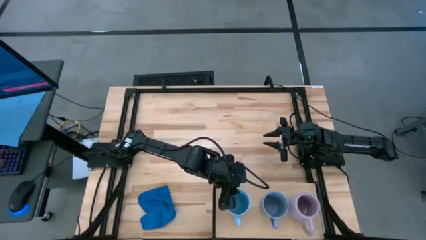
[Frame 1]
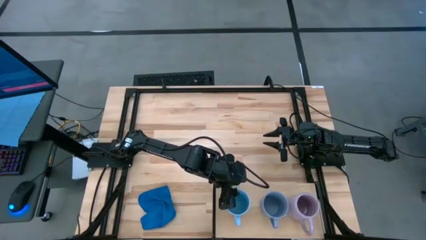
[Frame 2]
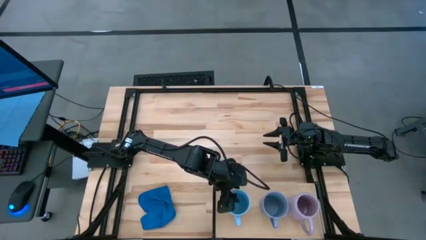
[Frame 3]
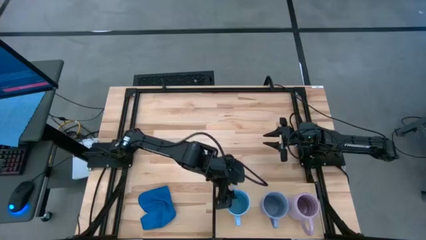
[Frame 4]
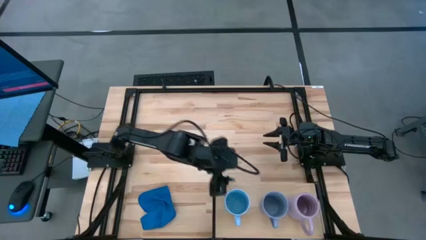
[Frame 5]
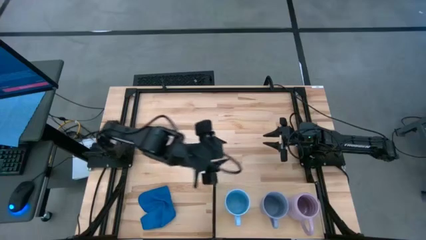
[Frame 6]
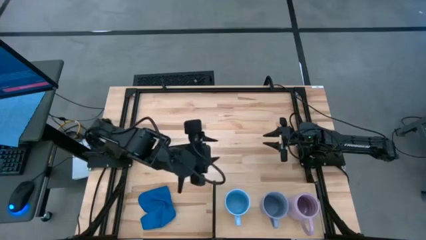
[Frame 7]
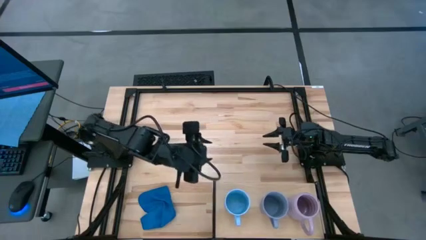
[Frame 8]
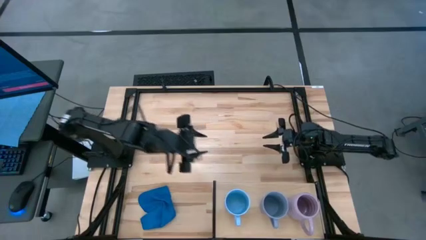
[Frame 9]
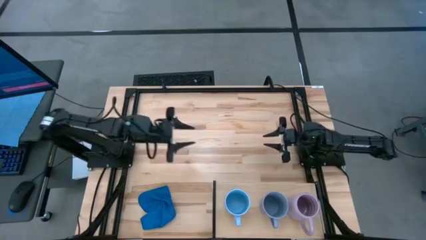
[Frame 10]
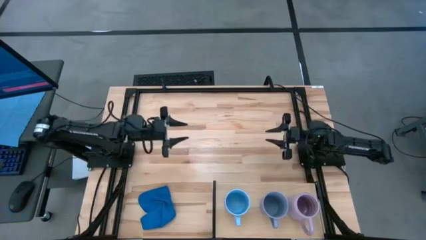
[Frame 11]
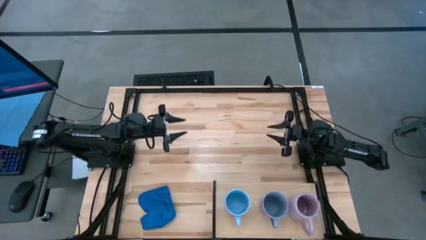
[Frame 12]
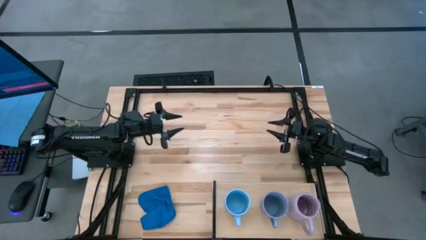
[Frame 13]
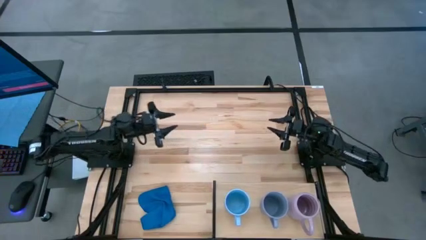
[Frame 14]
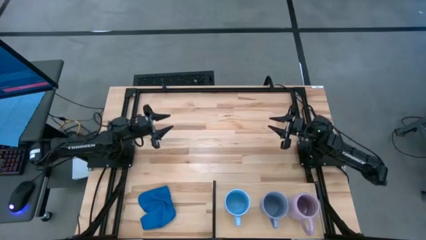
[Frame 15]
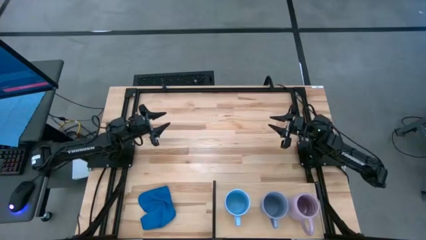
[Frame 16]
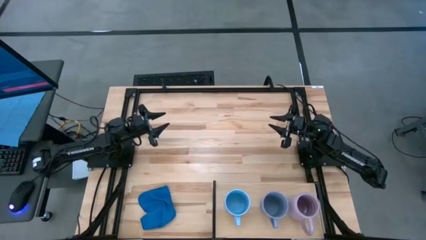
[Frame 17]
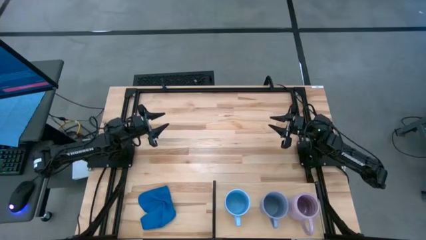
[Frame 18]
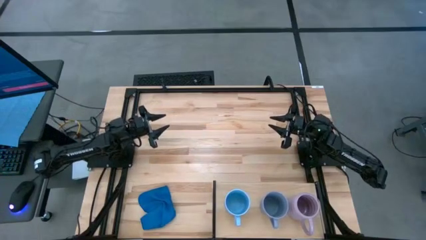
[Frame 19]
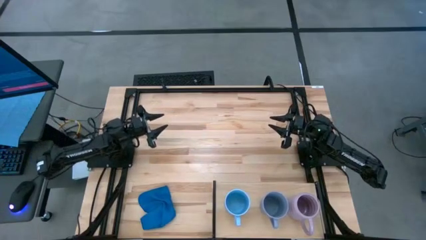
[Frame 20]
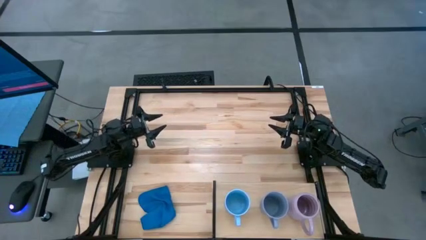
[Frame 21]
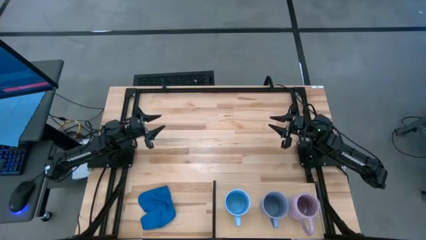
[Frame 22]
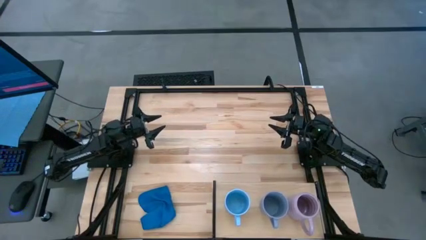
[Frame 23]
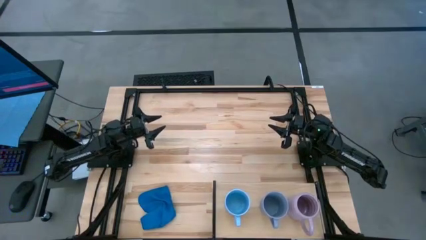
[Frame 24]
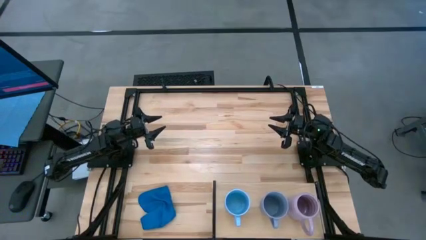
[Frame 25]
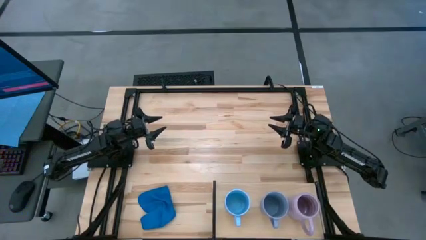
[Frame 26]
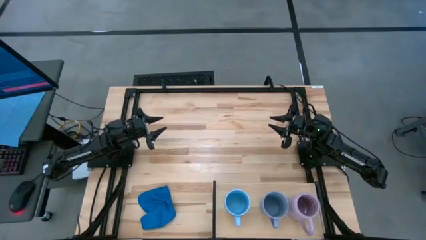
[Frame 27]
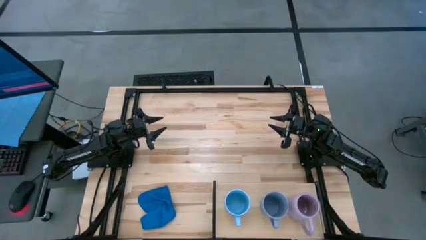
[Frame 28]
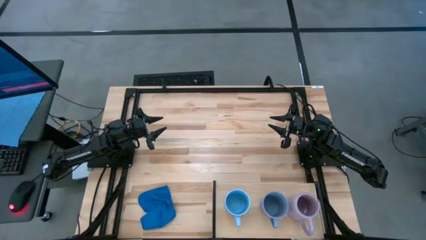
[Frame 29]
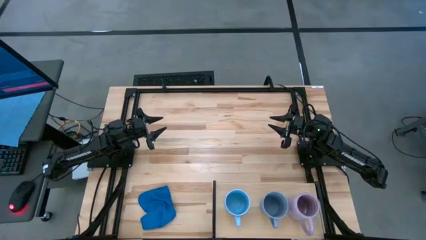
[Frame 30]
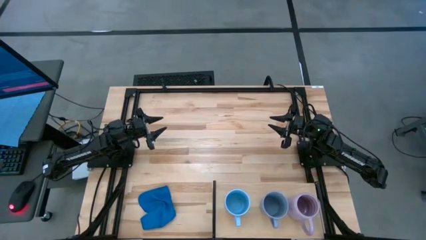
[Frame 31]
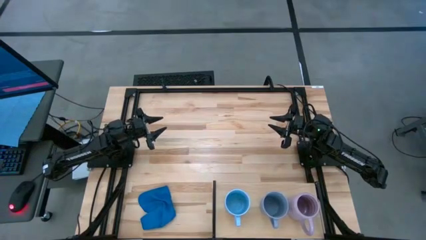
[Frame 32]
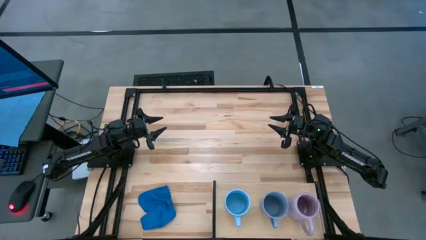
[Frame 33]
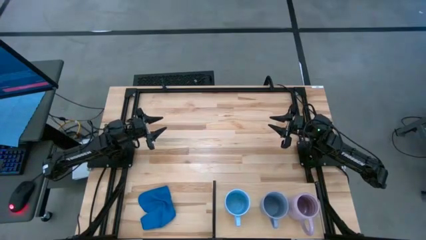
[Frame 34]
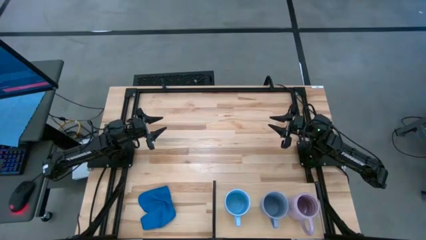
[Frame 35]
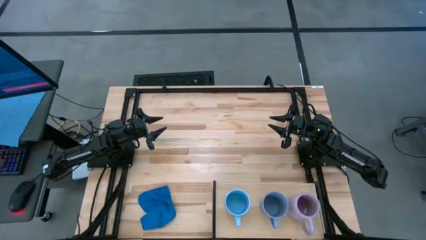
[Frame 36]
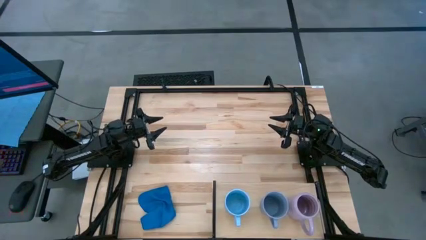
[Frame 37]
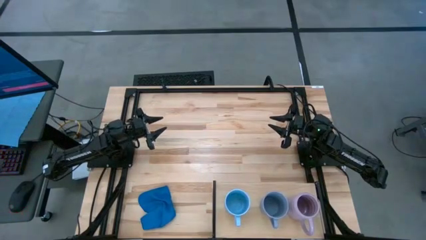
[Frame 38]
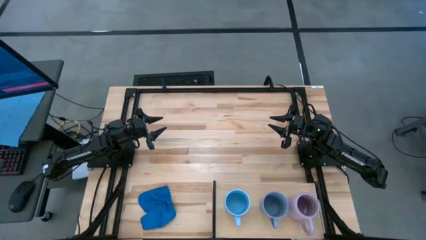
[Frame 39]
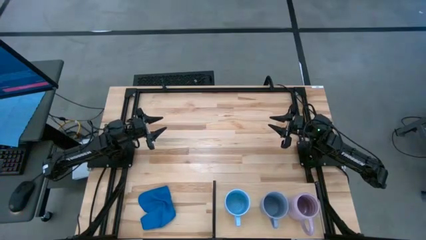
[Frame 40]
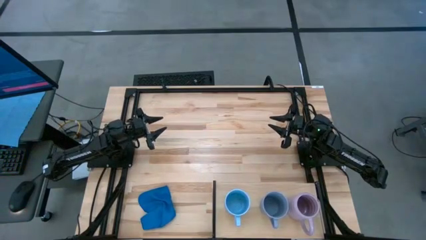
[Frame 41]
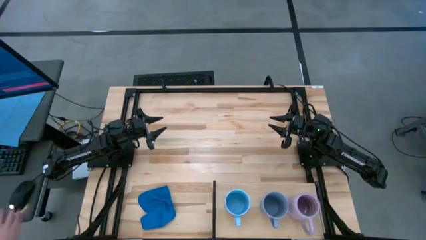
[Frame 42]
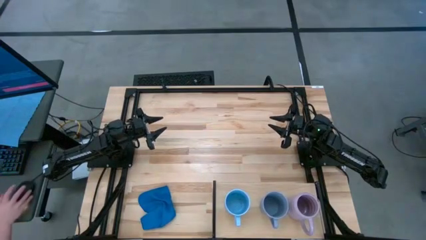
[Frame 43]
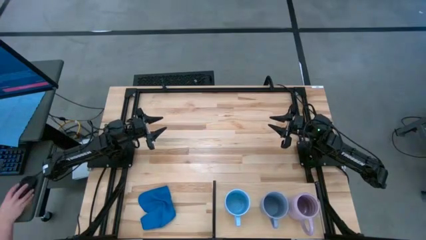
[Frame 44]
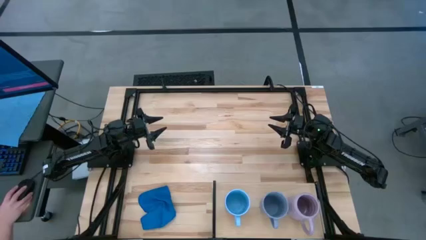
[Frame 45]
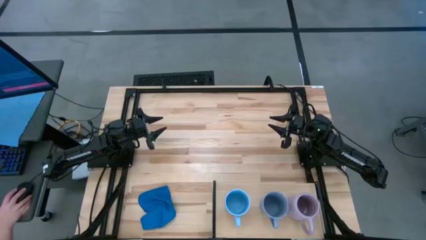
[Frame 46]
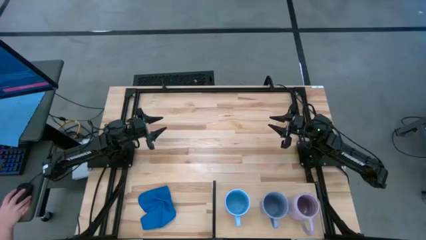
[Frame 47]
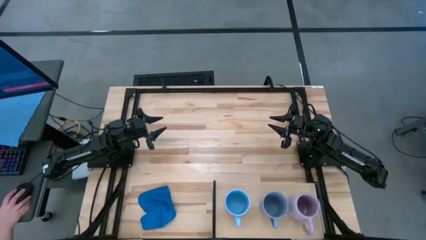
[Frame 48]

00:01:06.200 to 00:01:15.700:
Task: Stack small to large cups/mugs on shelf
Return to Home Position
